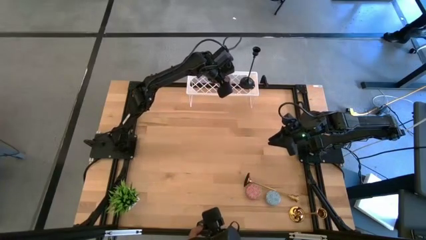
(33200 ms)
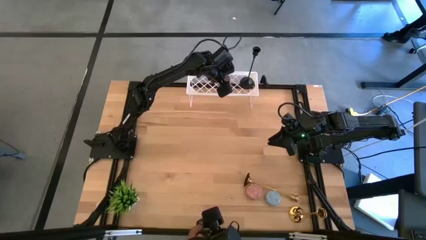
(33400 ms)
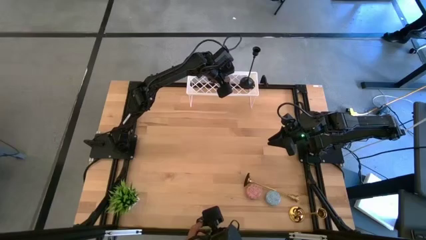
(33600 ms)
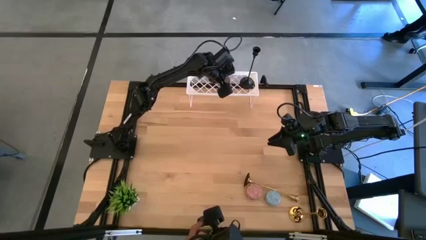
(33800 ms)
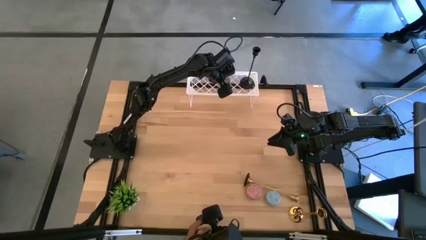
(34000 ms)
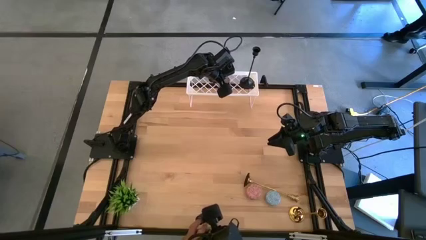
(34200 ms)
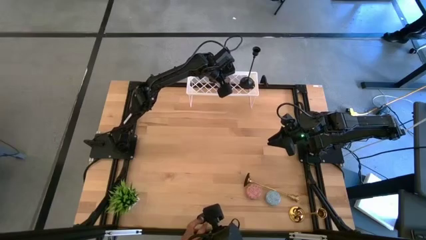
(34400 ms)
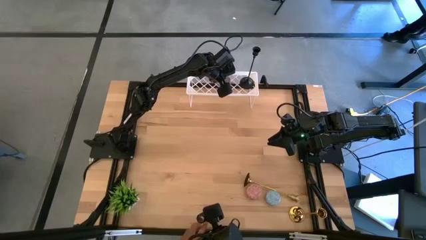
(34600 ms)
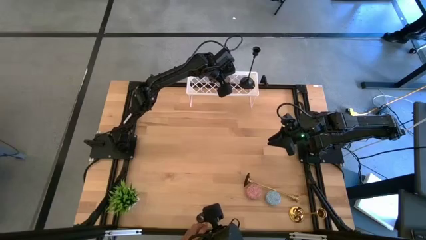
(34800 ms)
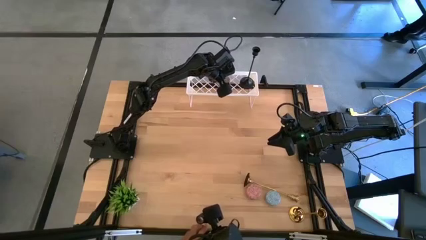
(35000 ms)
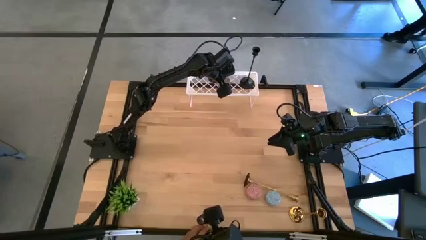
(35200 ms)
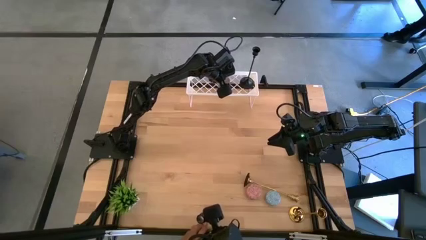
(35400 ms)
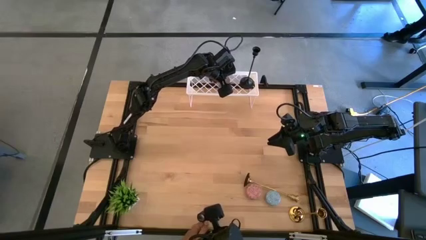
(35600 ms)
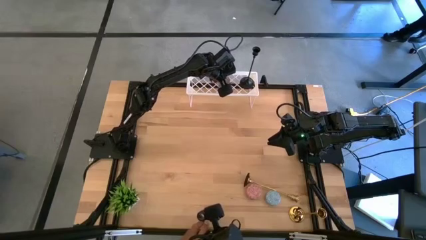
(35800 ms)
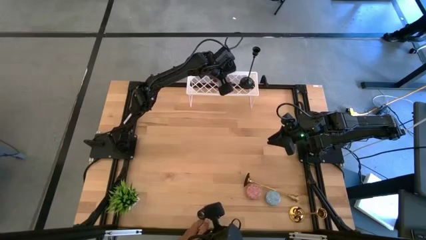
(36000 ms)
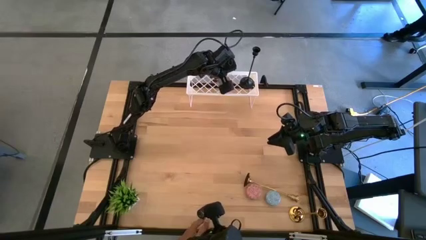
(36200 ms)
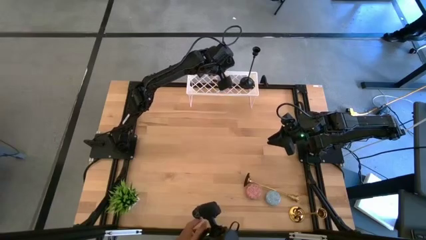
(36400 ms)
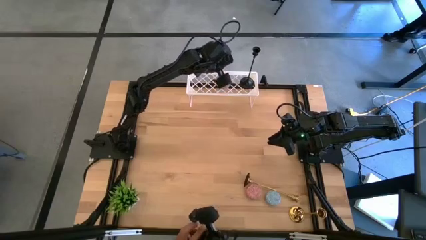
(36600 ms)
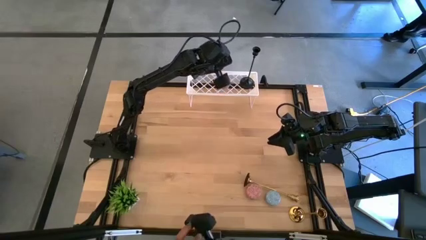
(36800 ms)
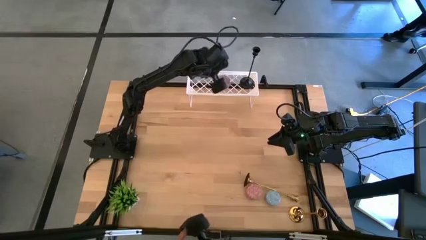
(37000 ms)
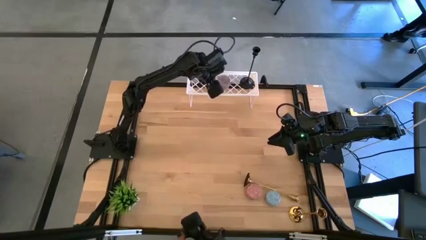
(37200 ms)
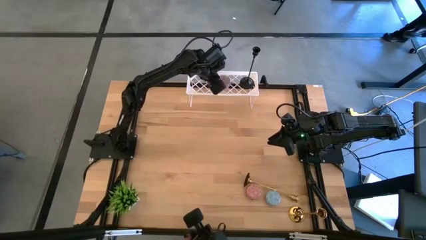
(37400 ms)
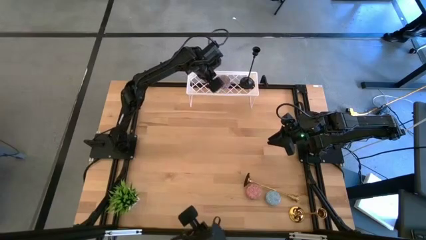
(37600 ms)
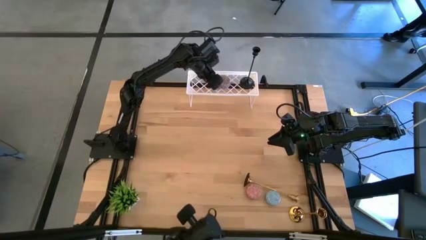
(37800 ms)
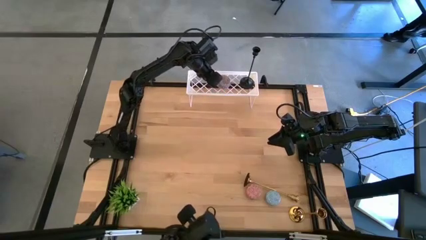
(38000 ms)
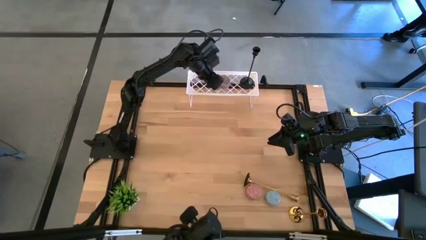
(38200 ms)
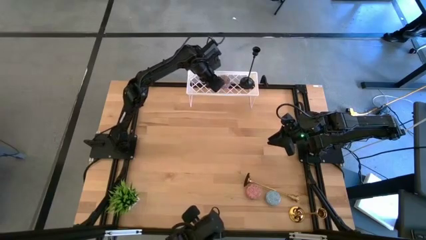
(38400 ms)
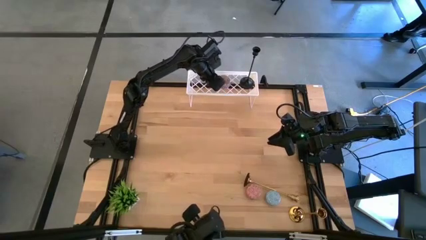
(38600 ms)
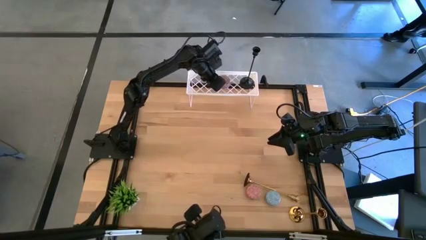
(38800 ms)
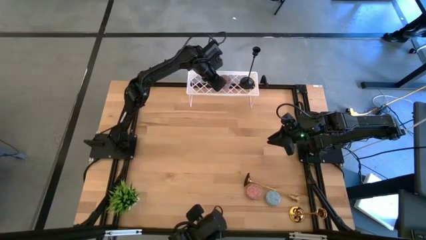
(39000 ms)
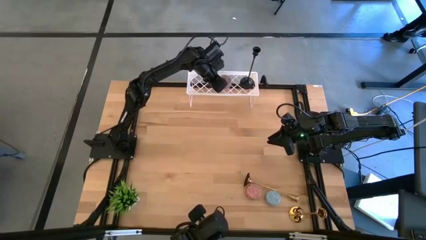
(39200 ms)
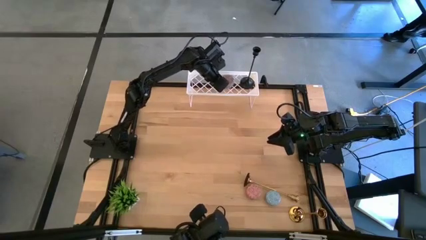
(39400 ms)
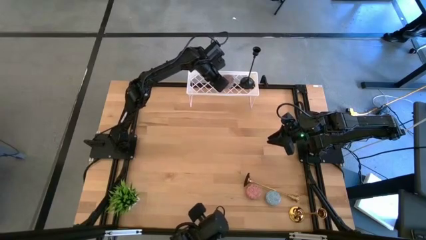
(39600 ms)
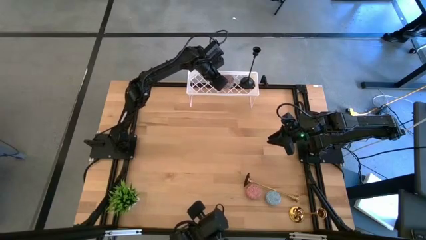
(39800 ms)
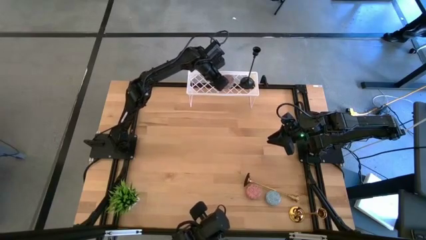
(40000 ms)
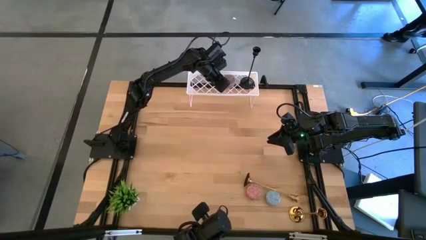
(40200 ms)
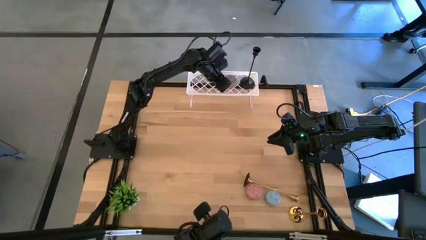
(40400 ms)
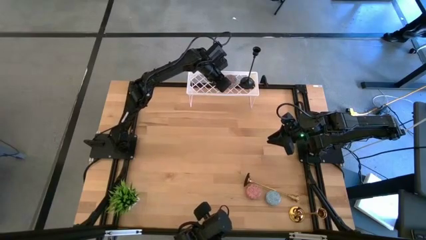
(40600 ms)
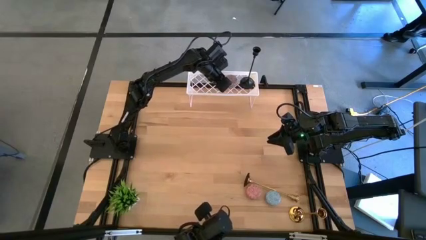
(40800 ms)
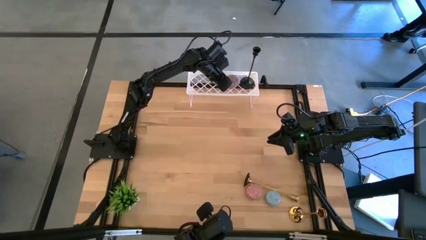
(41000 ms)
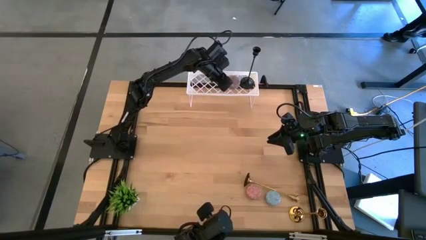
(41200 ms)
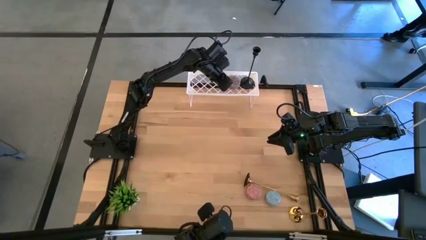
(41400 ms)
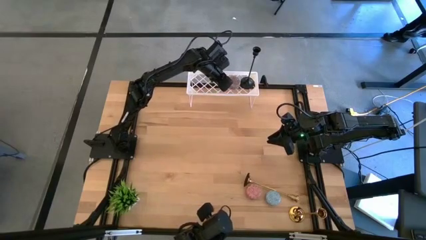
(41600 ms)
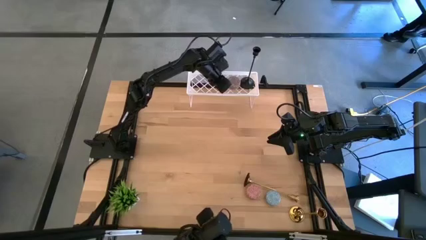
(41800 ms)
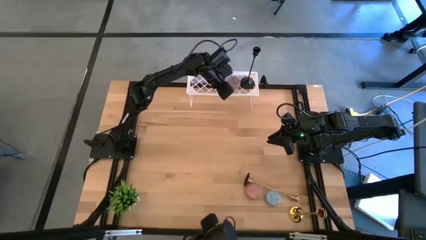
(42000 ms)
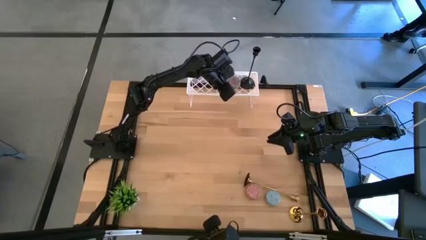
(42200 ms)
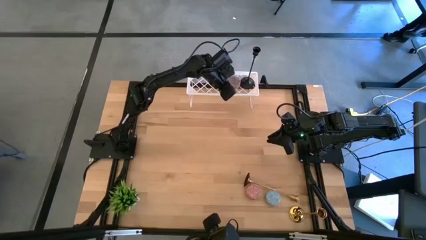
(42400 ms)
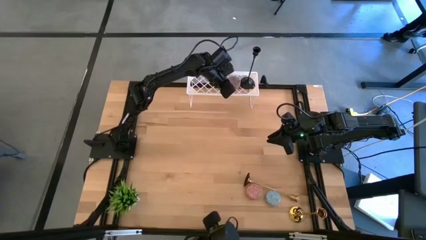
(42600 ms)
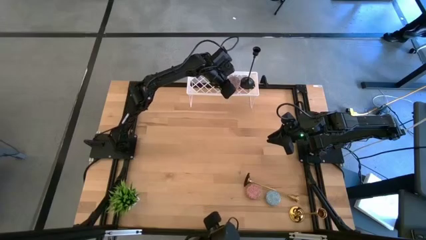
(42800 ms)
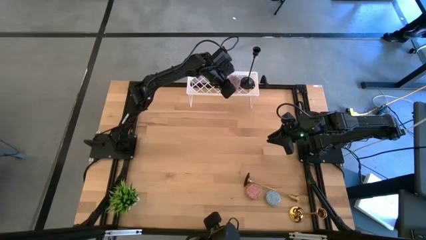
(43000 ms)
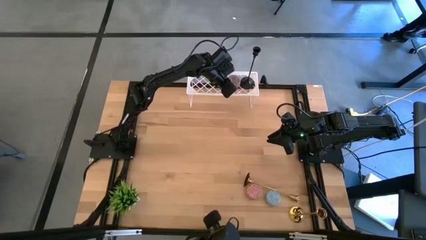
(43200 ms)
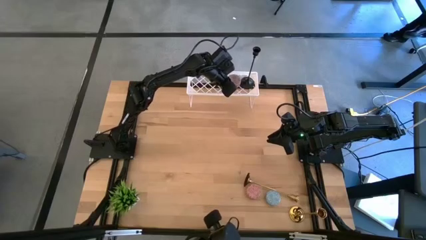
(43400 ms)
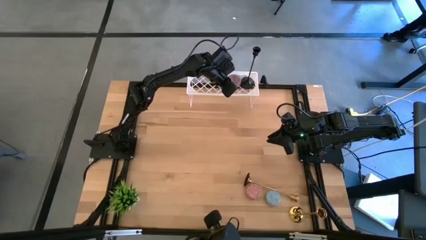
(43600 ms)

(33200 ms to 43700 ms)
Task: Pick & Place candle stick holders
Put the red scented candle on the shelf
